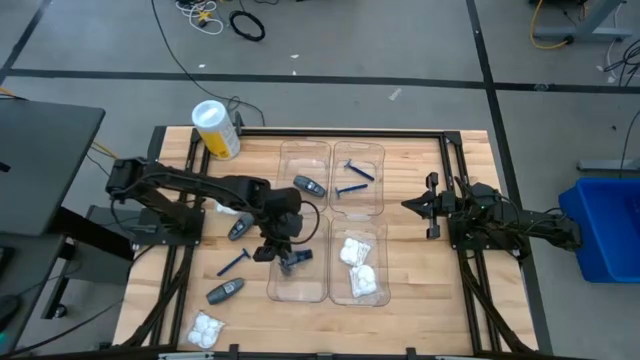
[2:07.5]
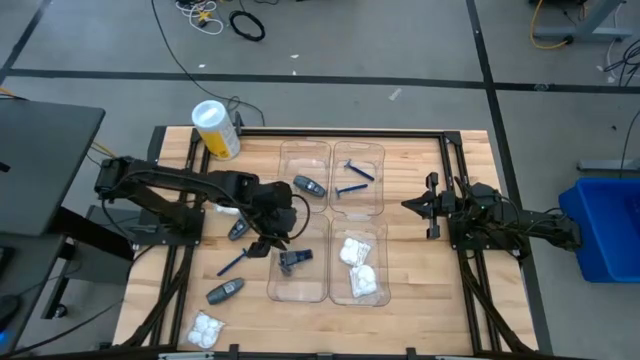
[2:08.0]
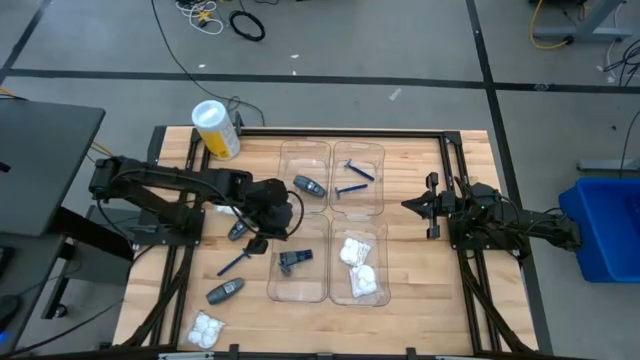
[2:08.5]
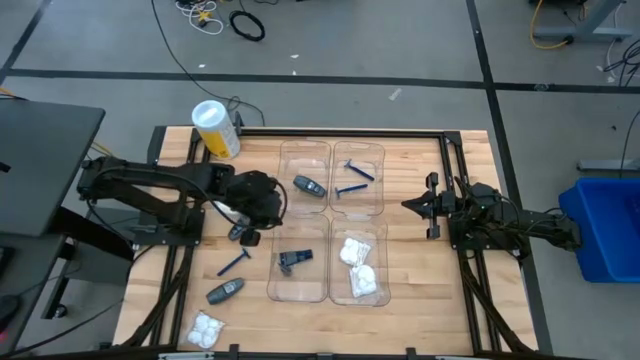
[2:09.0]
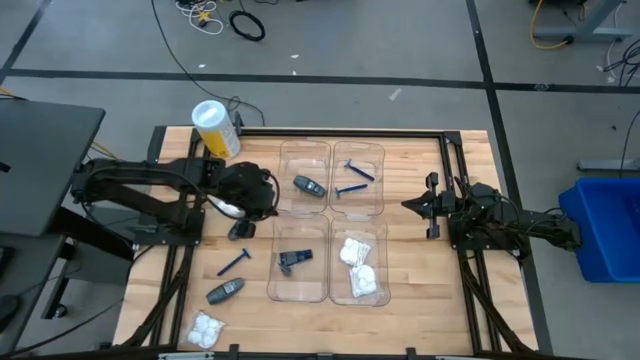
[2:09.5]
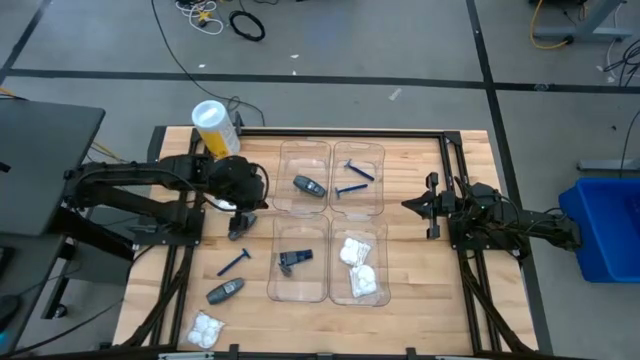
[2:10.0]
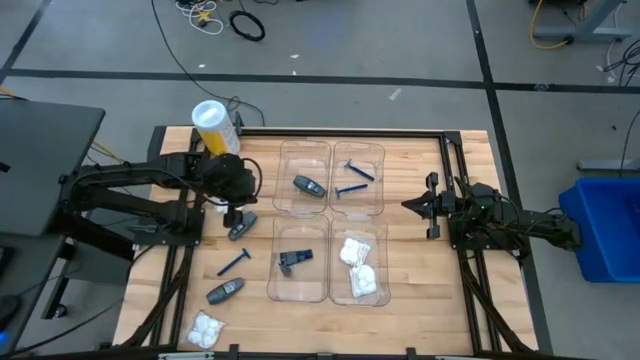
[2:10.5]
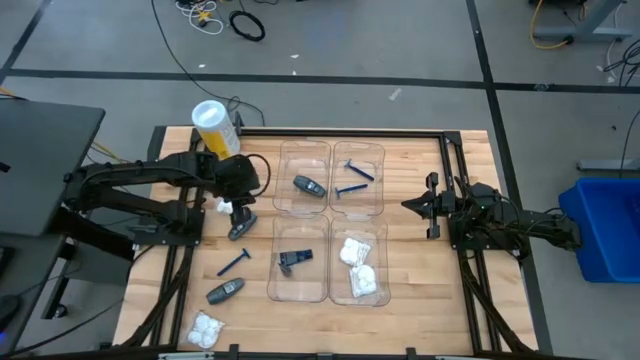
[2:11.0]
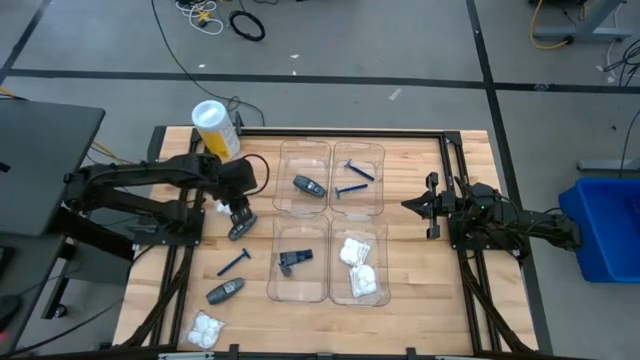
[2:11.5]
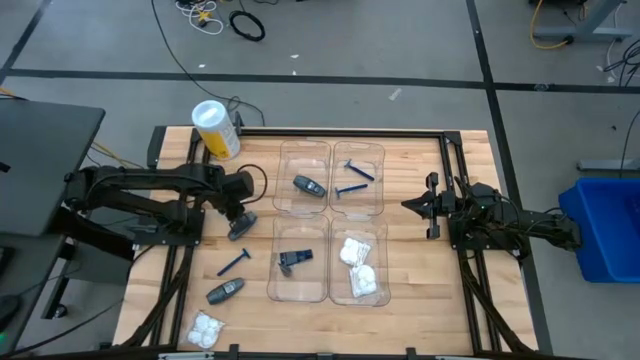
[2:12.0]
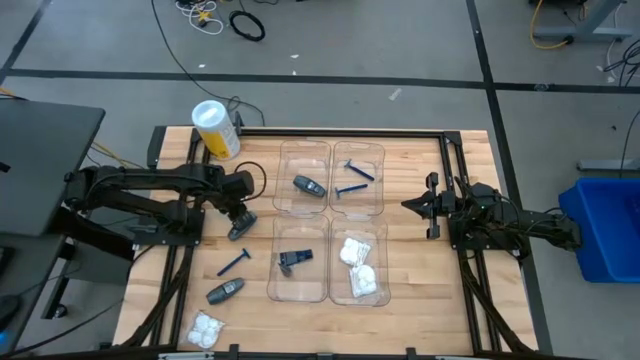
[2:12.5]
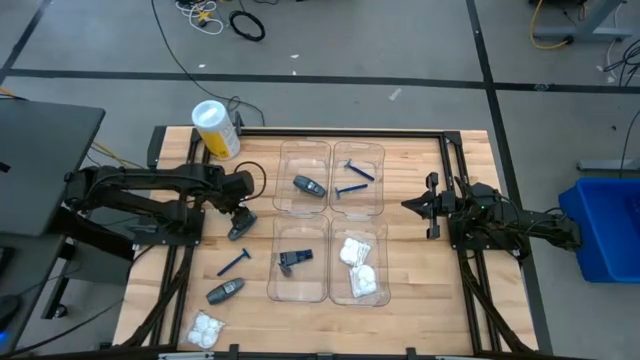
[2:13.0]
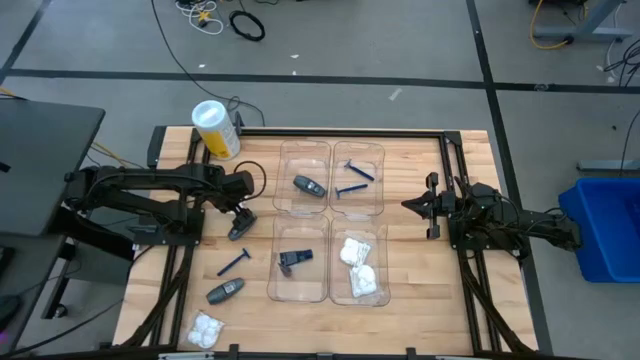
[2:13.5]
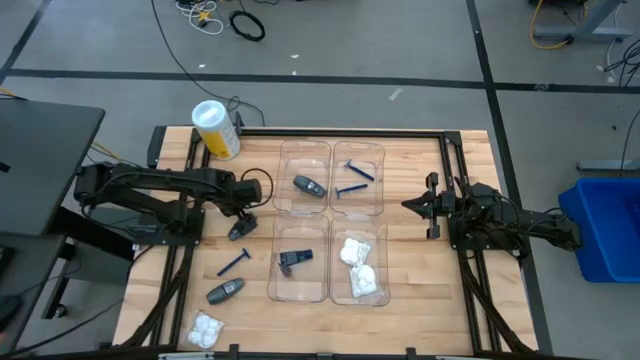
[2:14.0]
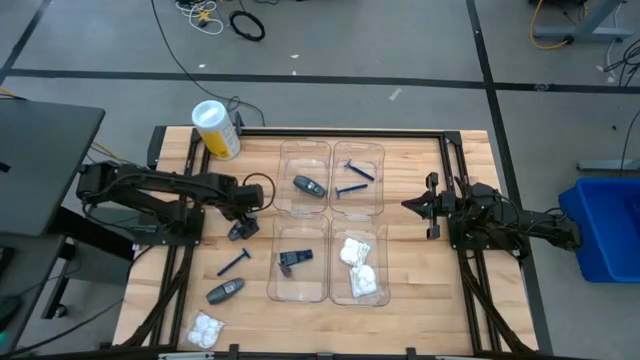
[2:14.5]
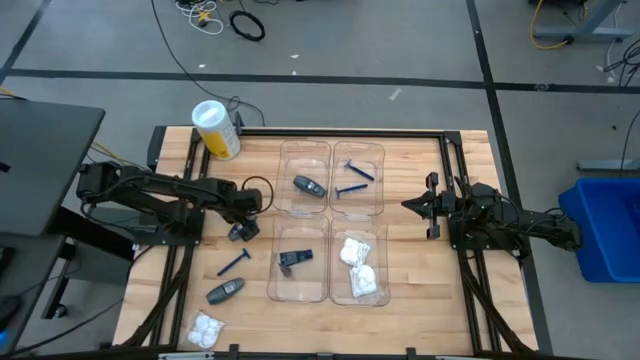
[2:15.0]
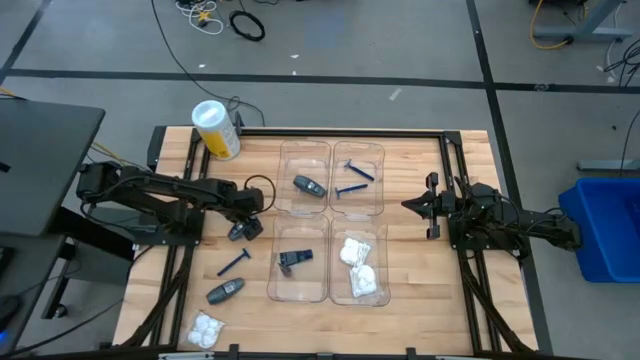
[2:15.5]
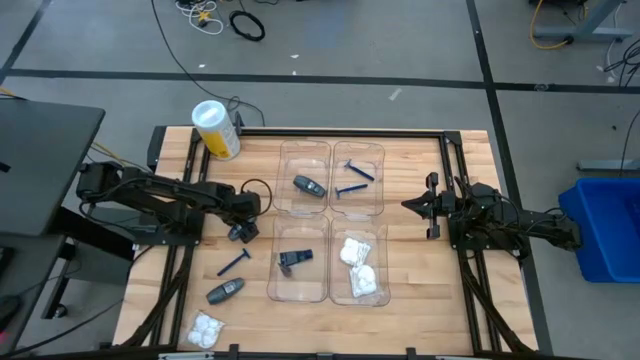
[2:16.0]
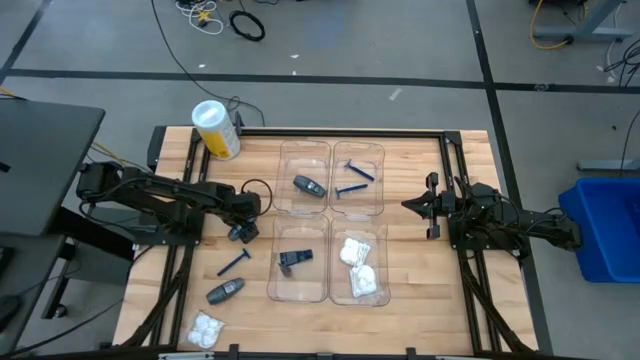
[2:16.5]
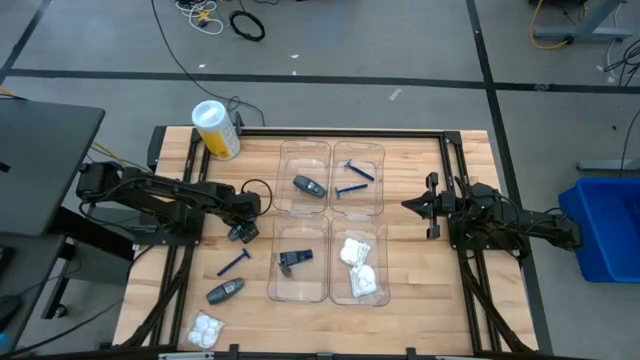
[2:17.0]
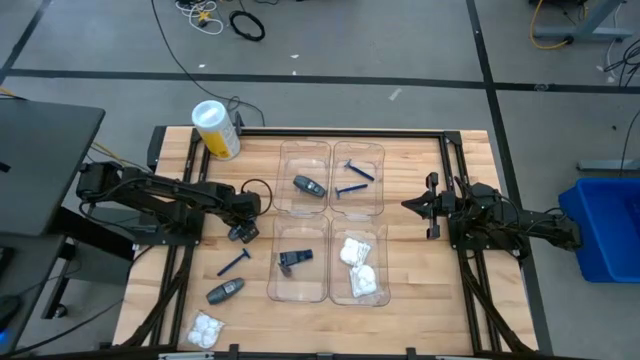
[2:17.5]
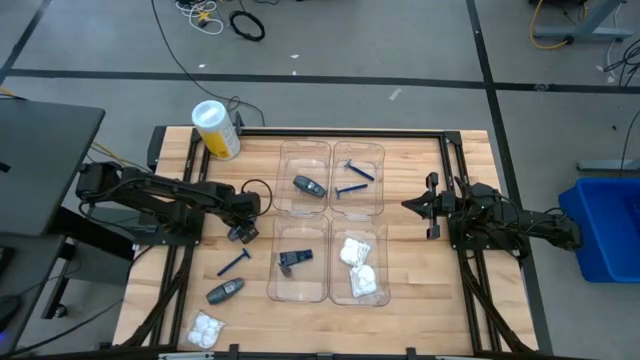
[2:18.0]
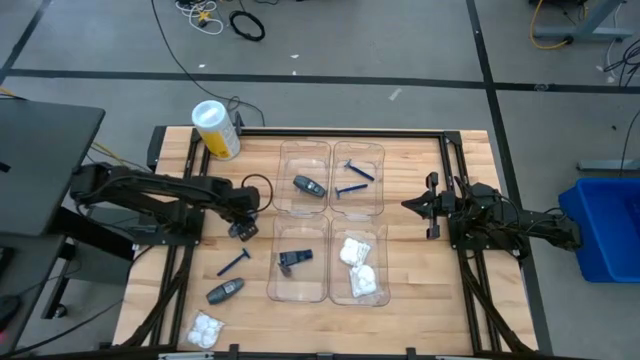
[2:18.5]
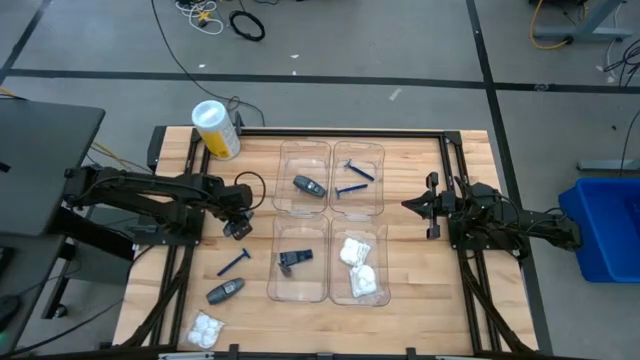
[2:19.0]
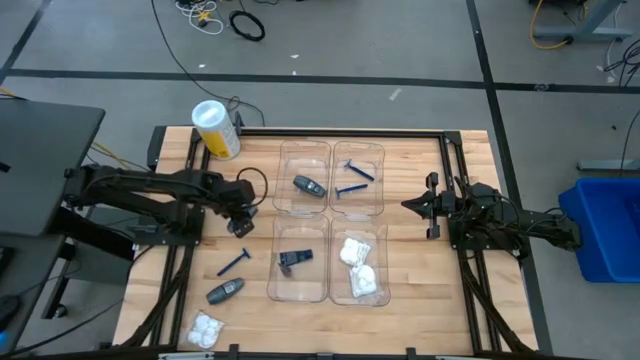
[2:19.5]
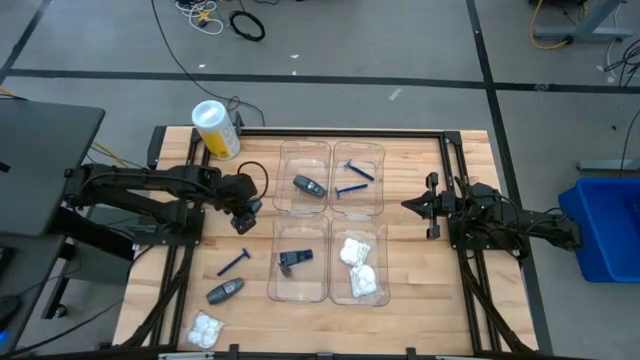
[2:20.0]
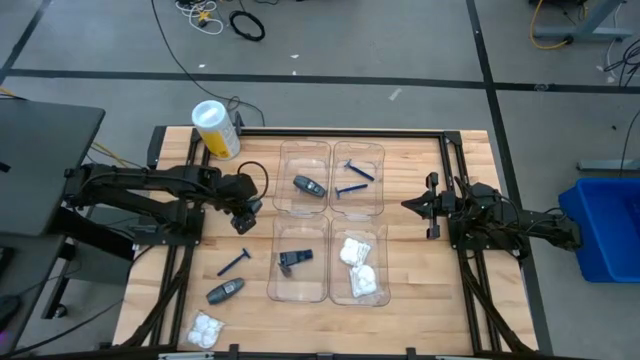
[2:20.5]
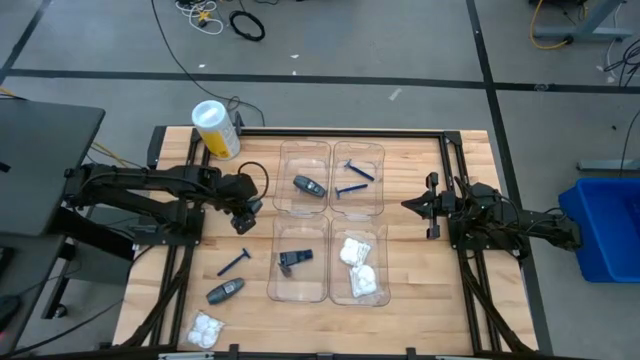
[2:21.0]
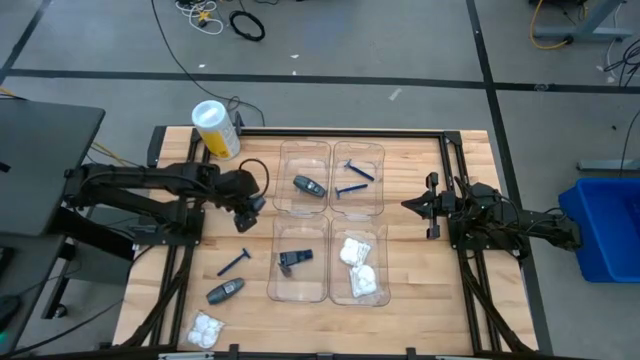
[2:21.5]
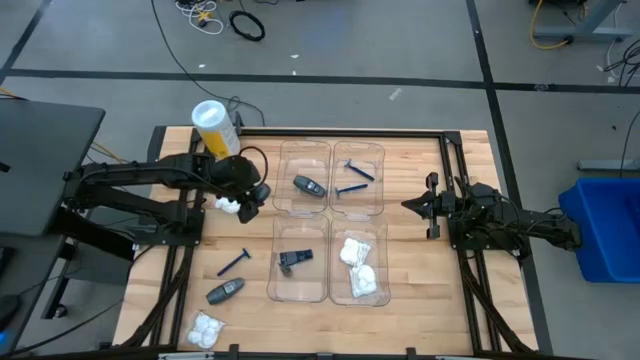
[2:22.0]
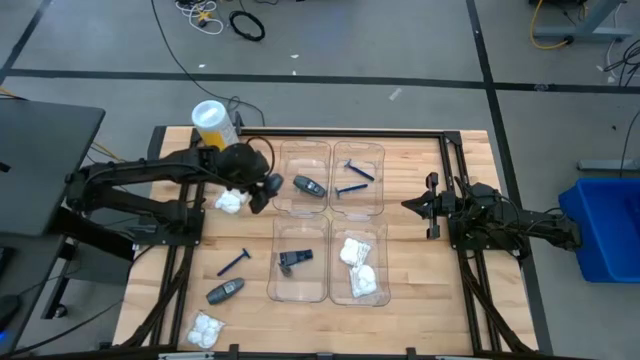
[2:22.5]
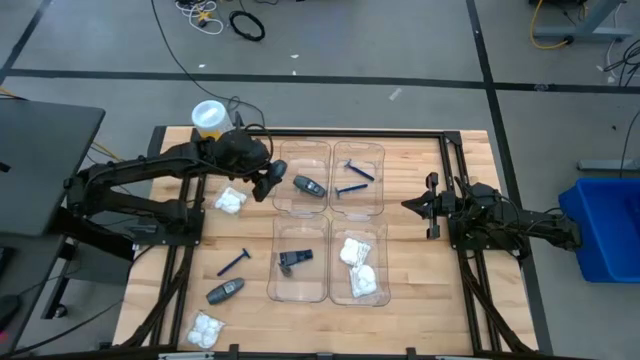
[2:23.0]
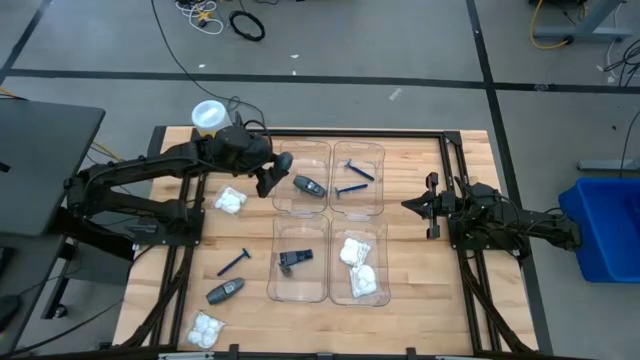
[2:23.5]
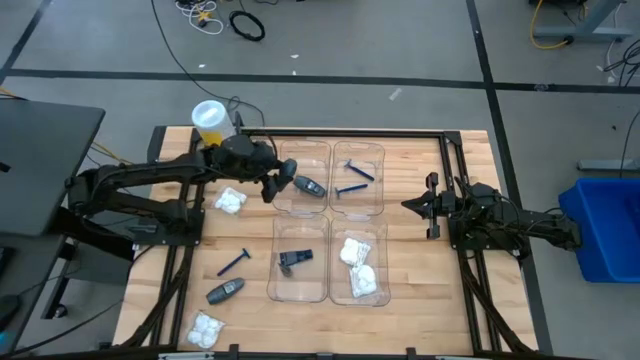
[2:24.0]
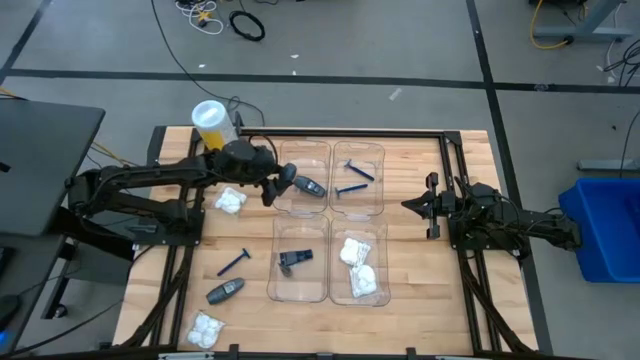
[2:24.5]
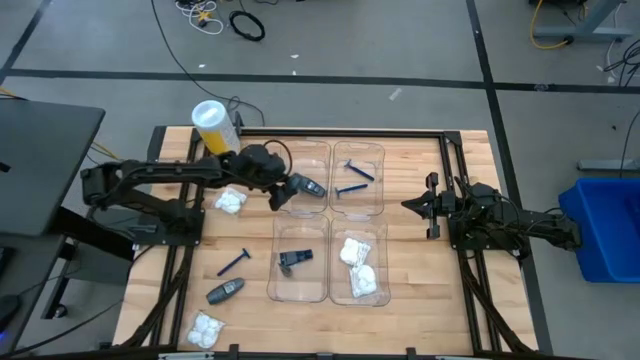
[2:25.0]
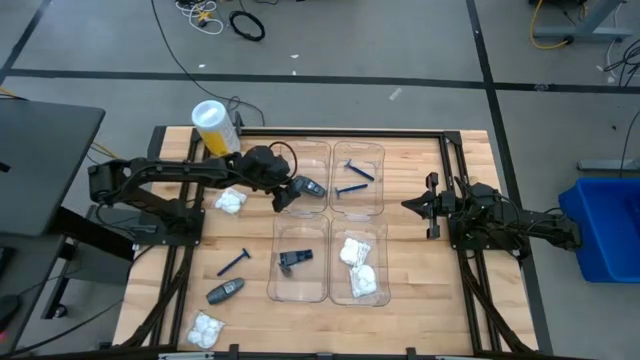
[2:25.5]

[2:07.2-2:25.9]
Task: Pick & Place Travel size toiletries
Put the top deodorant into the top left transparent bin
